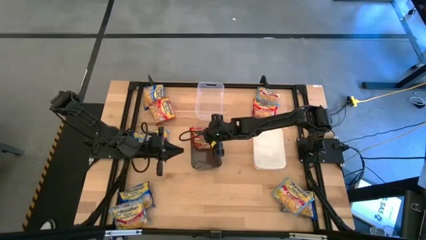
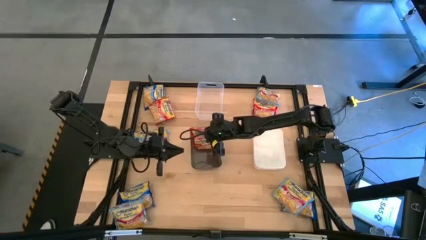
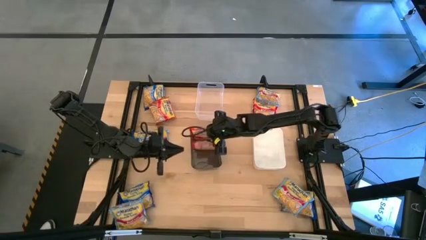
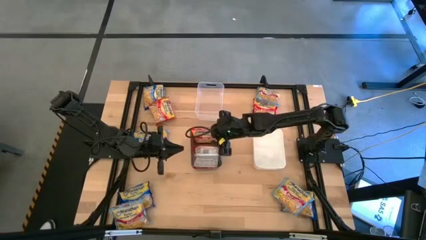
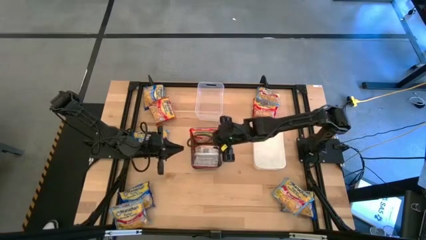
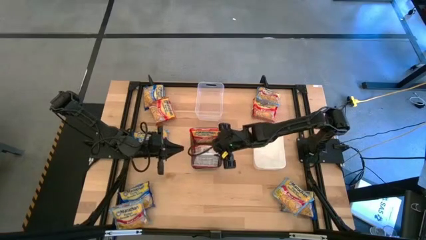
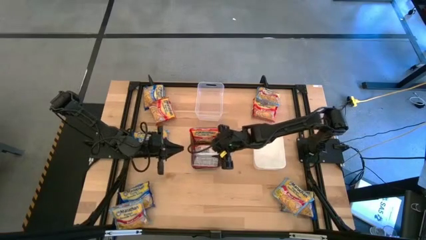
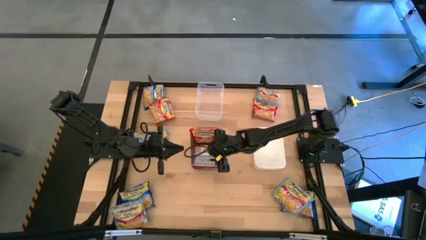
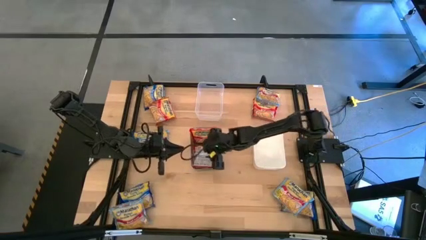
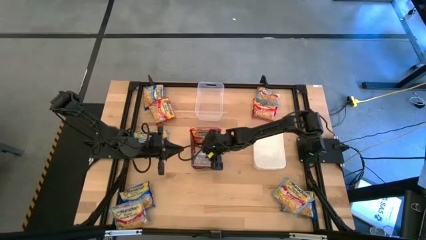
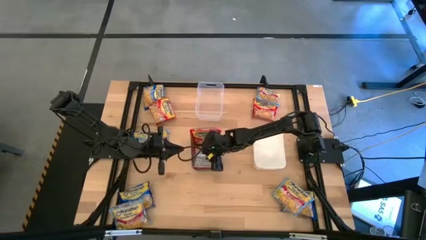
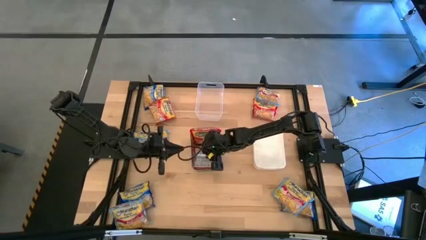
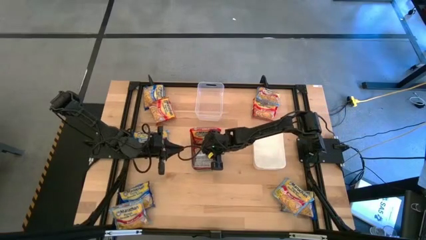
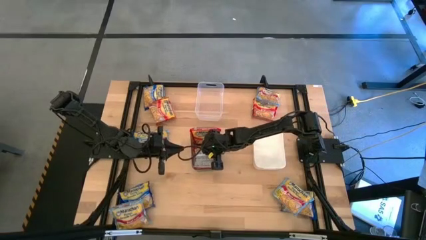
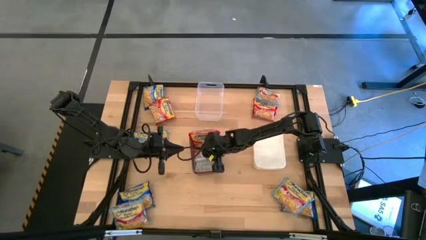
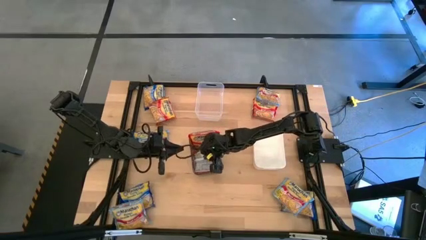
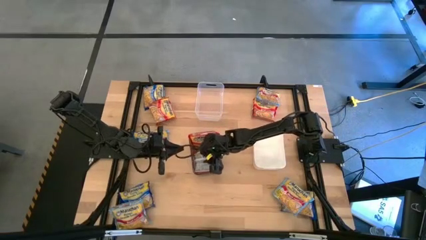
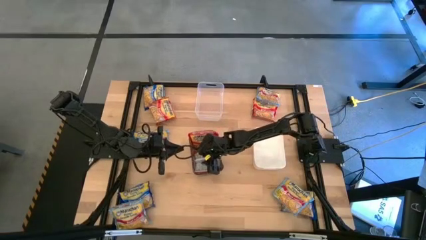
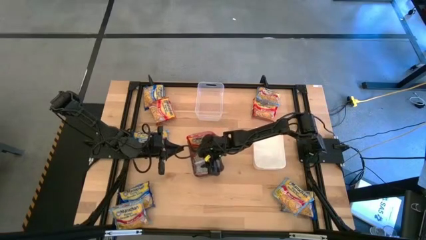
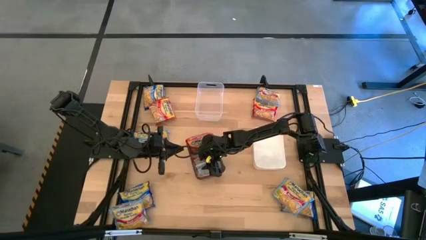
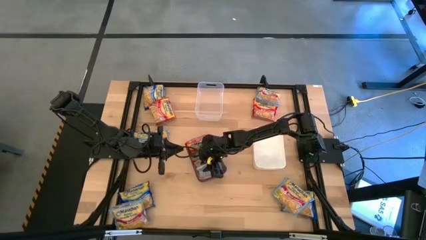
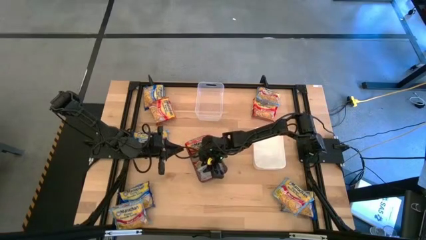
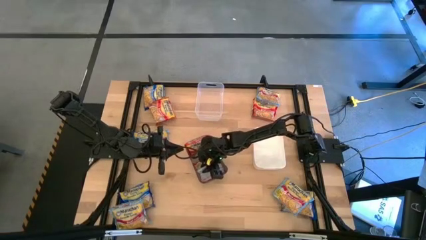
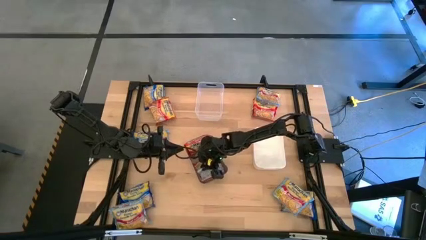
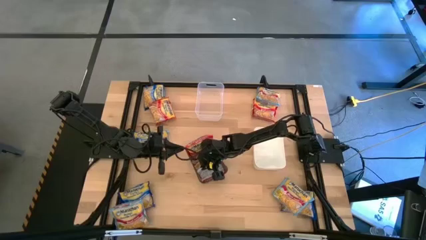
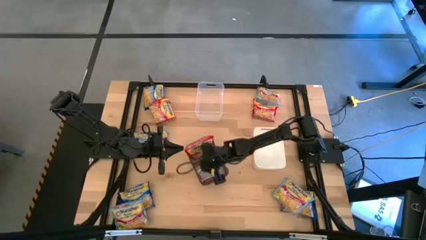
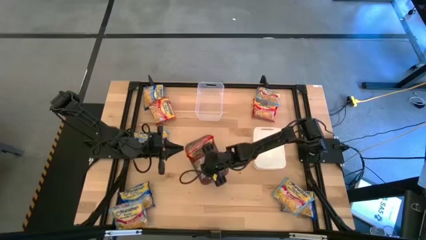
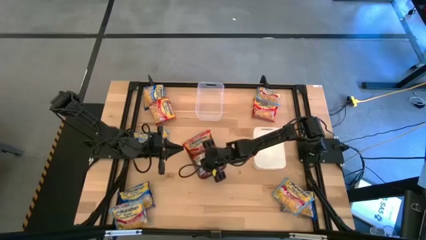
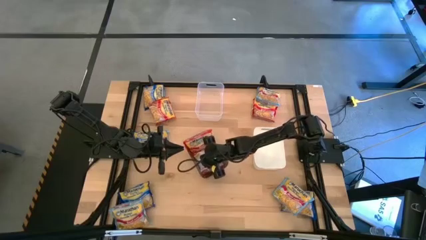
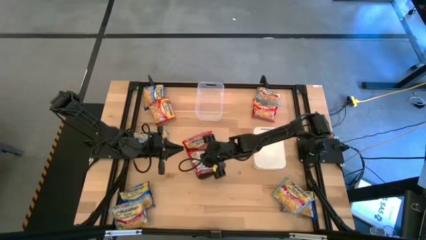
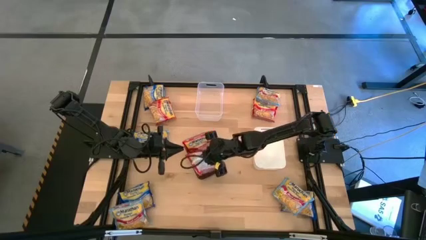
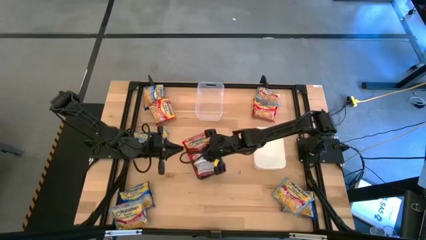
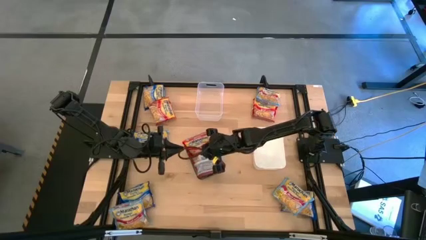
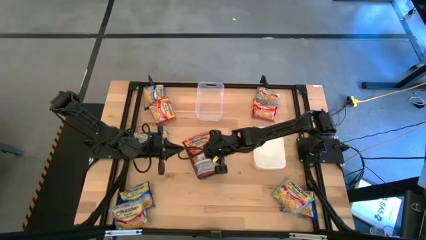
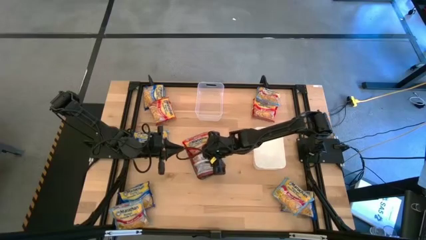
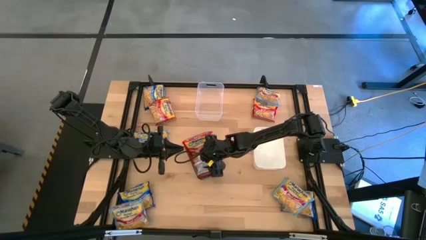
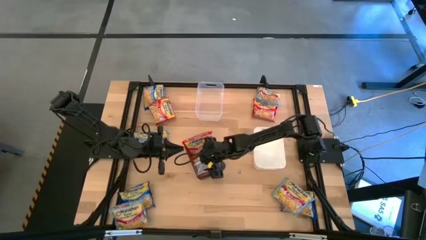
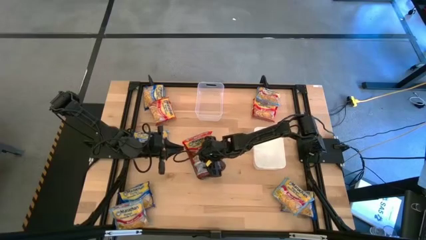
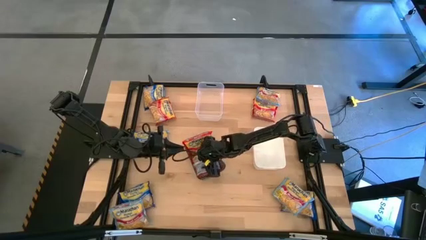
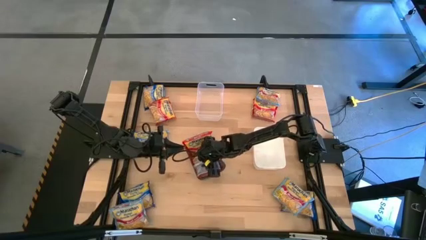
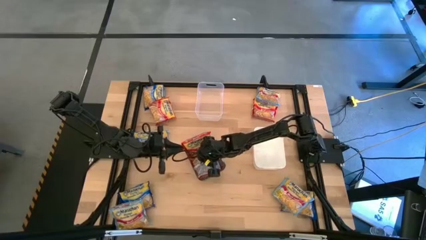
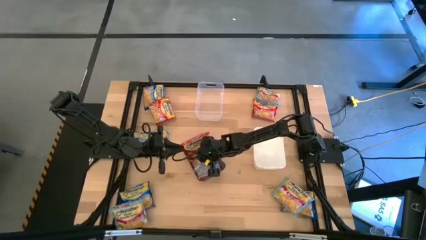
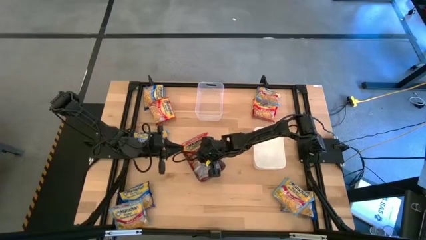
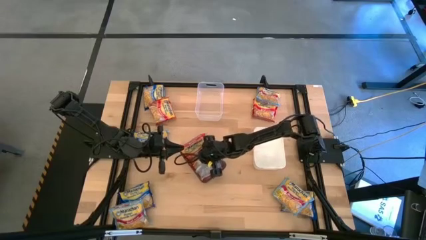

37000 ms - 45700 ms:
Task: Sort Maruchan noodles
Remove the red noodle pack from the gray bin

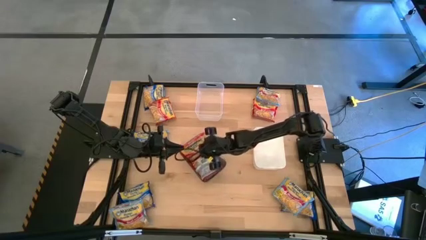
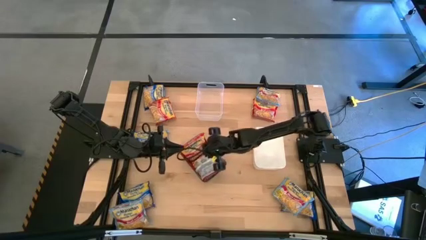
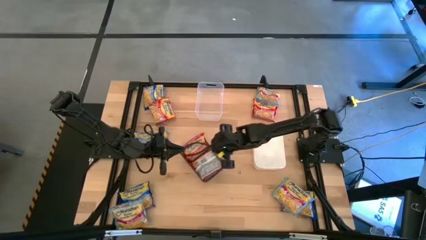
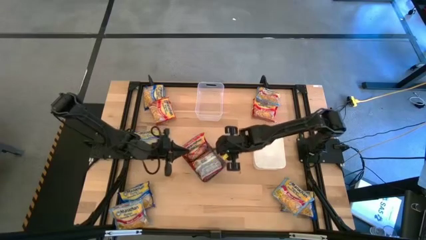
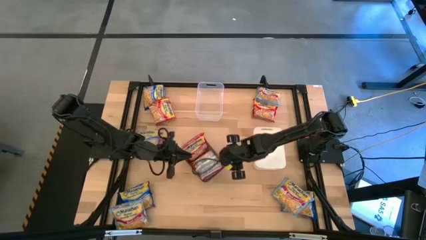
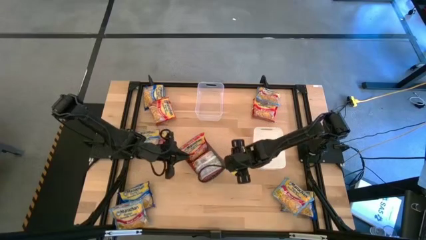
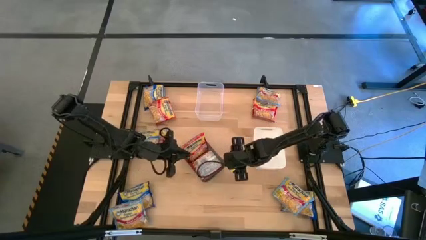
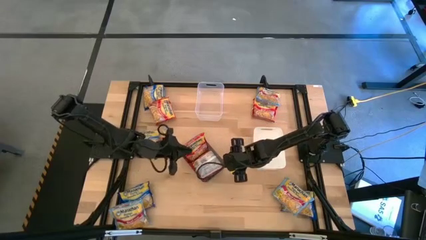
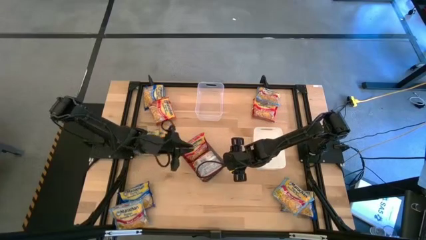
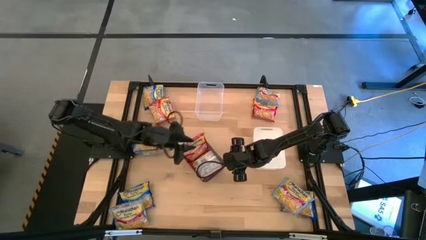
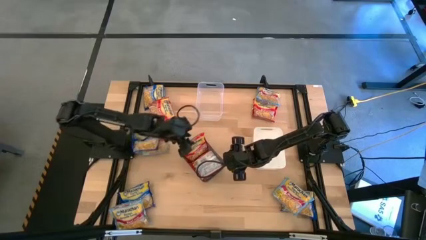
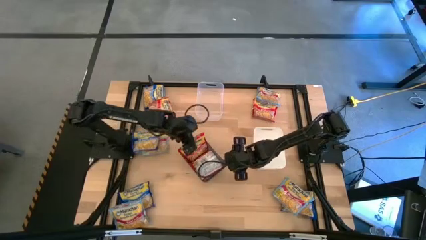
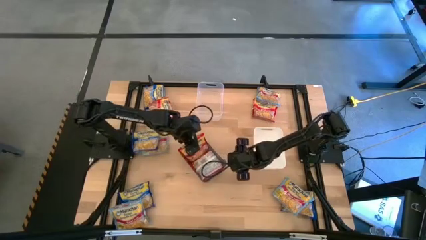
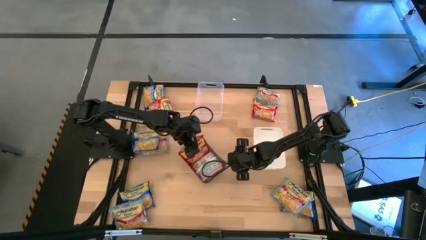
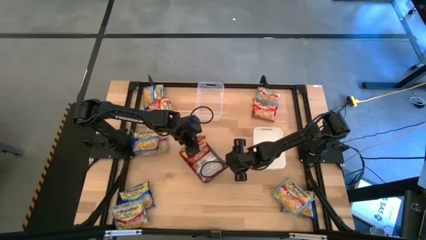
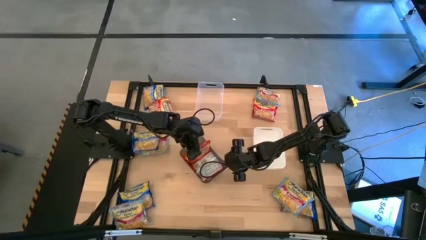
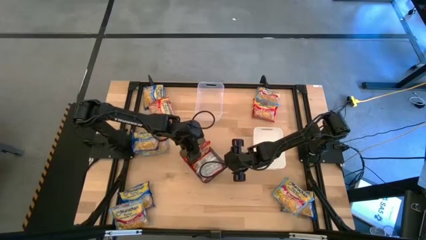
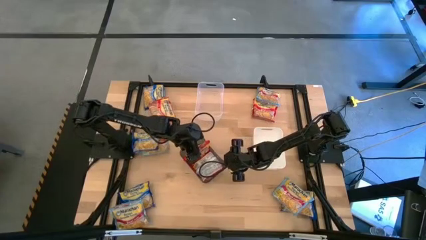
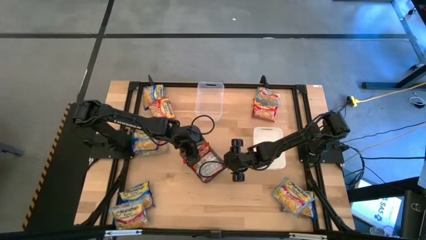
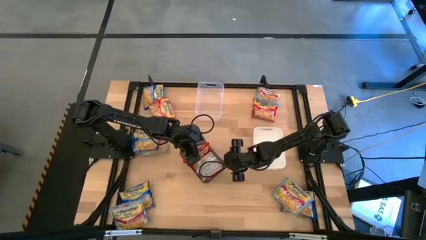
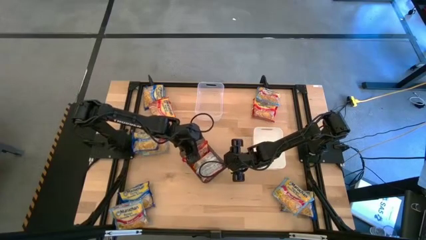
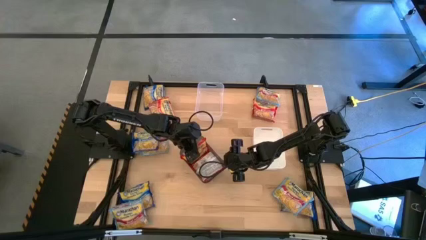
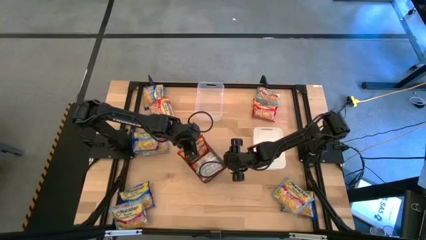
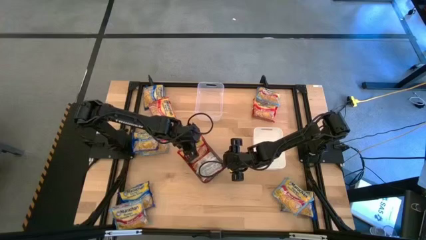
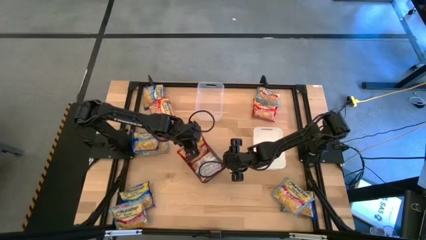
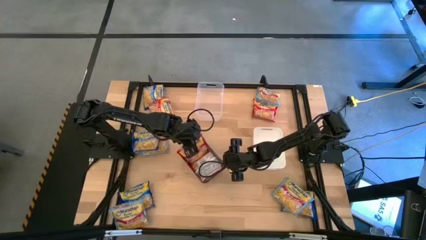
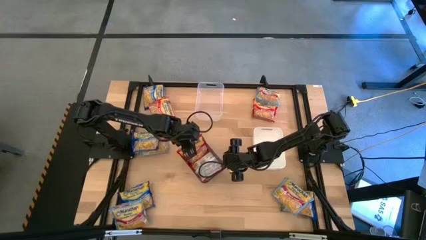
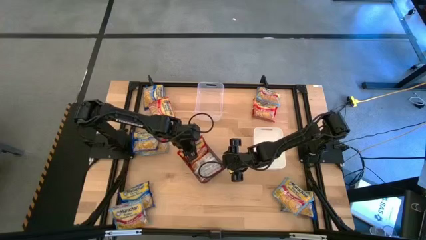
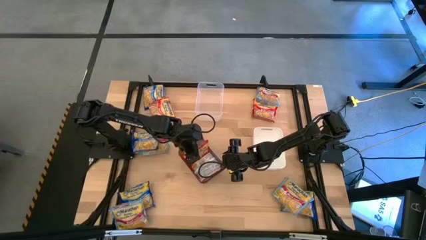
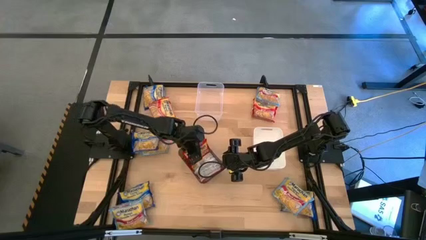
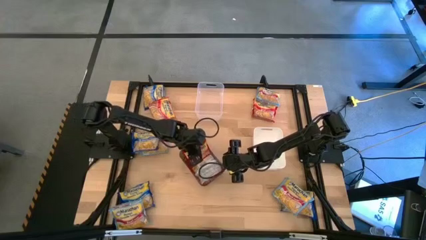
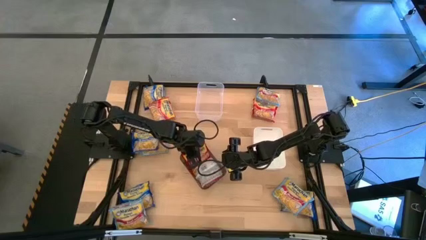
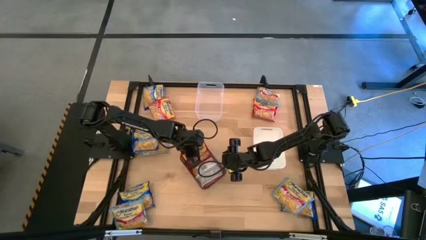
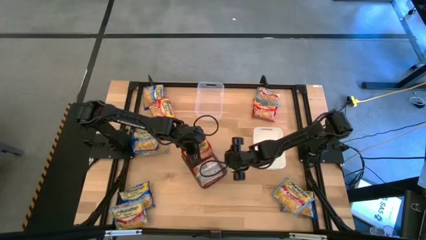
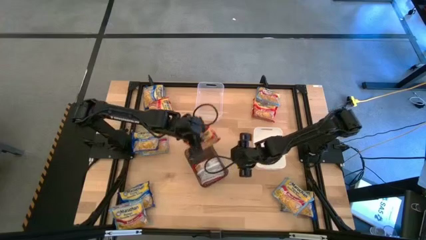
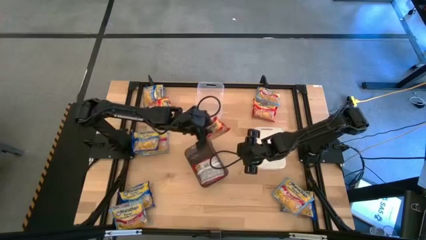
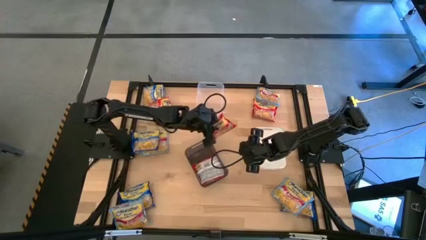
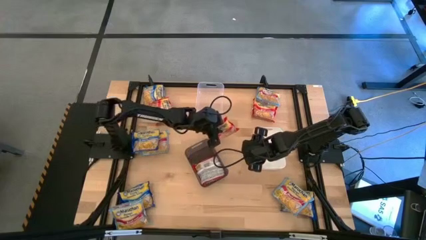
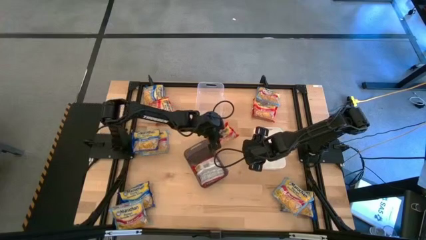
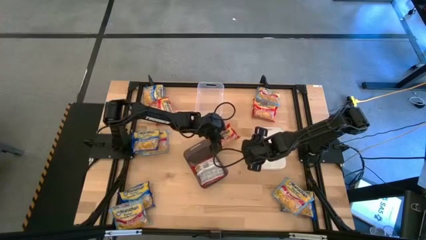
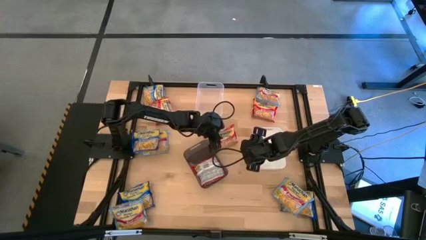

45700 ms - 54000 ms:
Remove the red noodle pack from the gray bin
